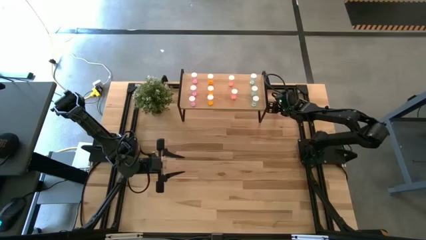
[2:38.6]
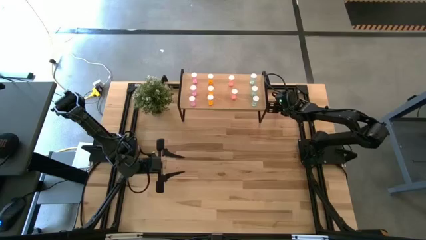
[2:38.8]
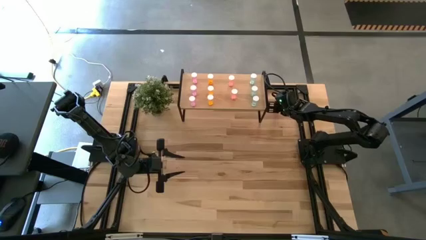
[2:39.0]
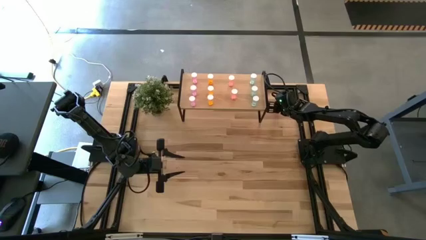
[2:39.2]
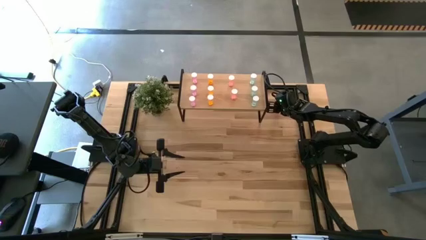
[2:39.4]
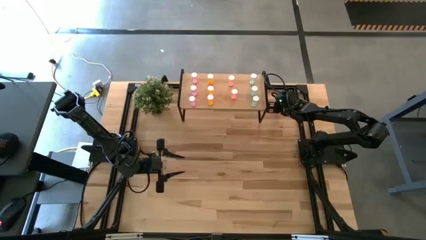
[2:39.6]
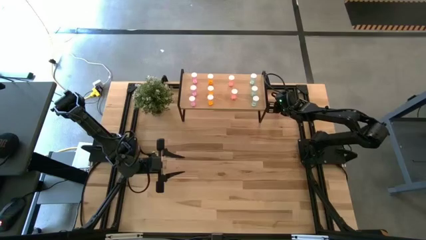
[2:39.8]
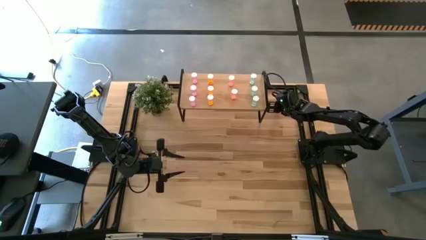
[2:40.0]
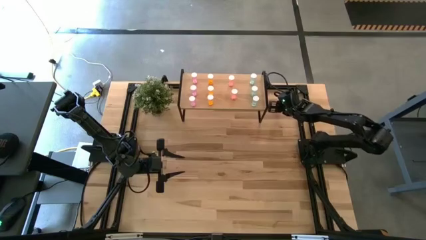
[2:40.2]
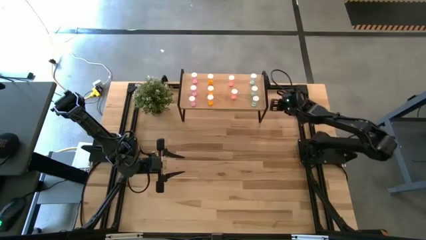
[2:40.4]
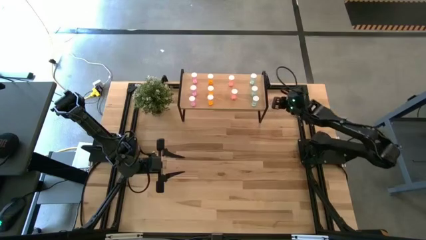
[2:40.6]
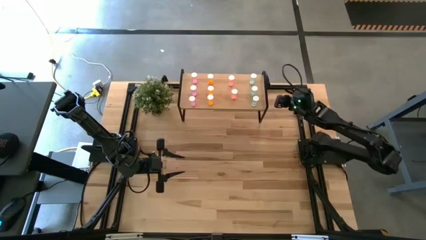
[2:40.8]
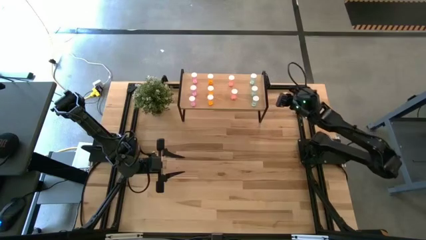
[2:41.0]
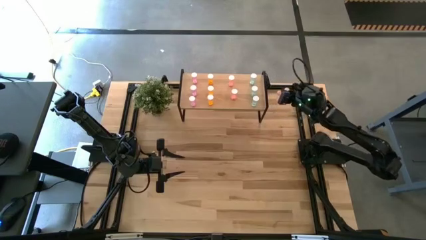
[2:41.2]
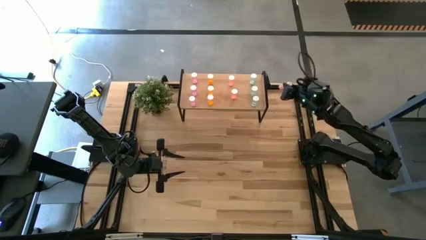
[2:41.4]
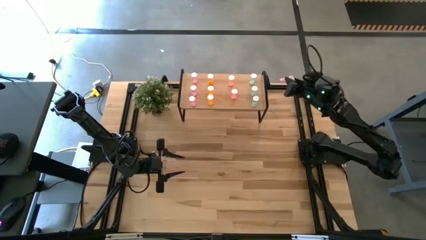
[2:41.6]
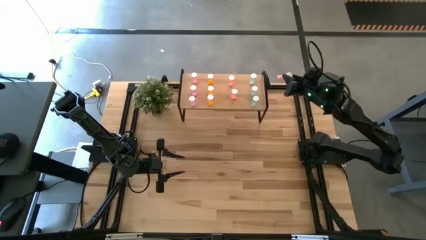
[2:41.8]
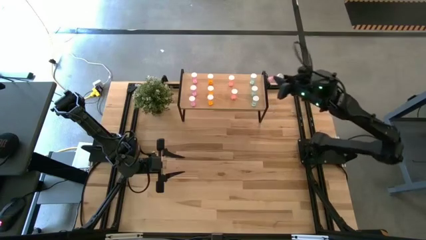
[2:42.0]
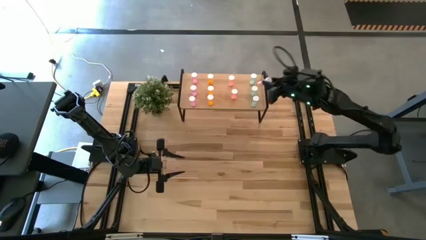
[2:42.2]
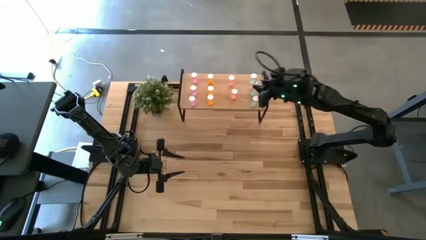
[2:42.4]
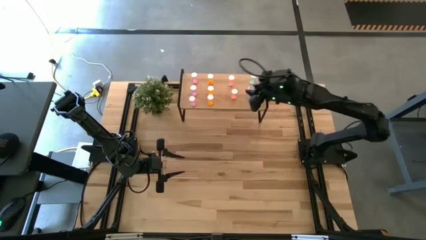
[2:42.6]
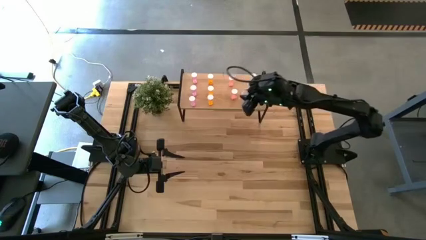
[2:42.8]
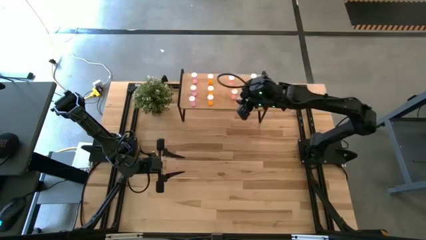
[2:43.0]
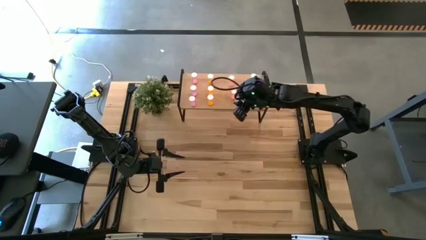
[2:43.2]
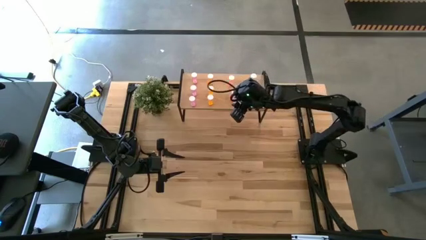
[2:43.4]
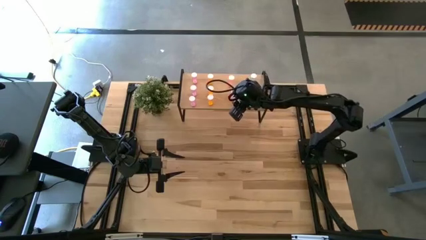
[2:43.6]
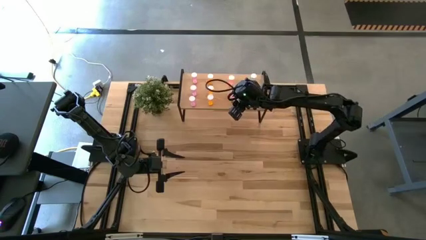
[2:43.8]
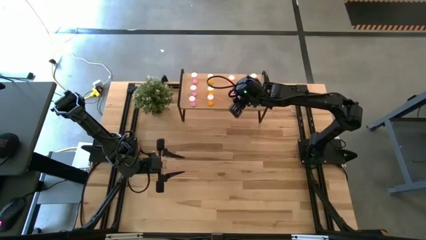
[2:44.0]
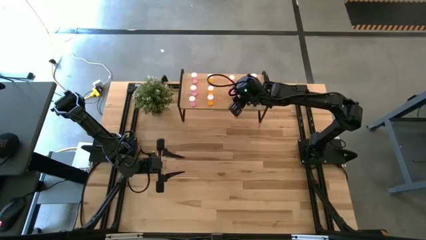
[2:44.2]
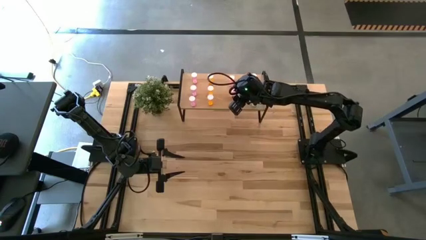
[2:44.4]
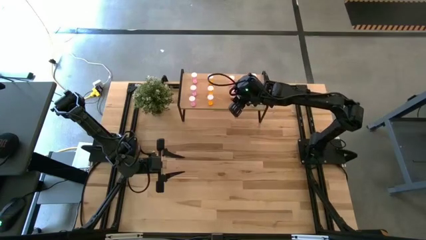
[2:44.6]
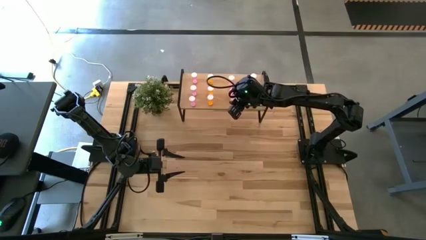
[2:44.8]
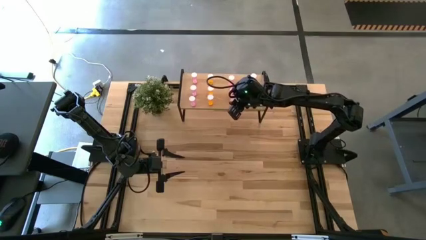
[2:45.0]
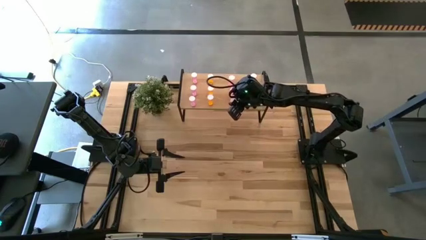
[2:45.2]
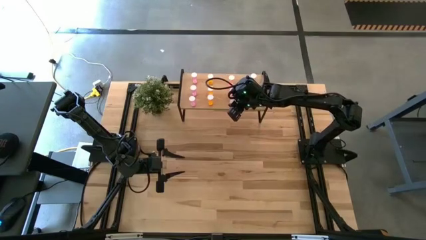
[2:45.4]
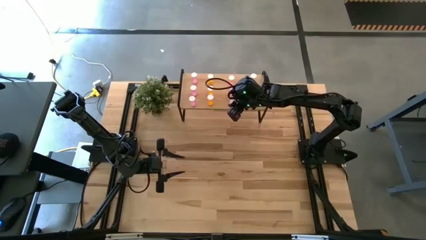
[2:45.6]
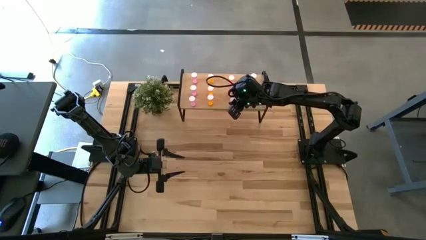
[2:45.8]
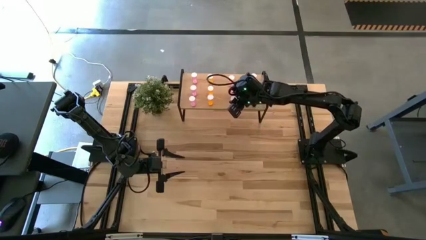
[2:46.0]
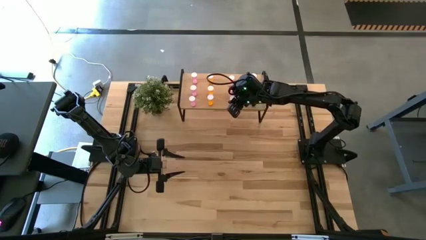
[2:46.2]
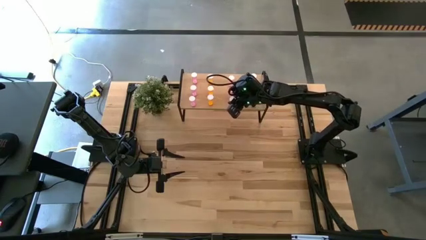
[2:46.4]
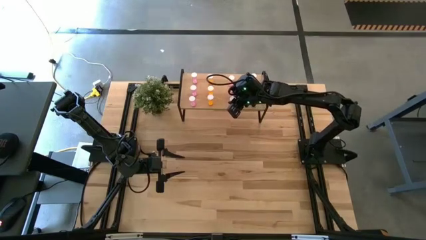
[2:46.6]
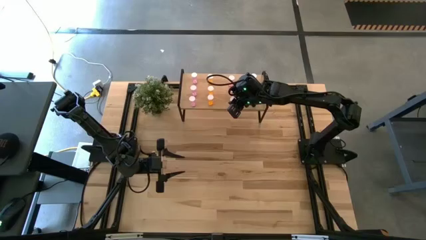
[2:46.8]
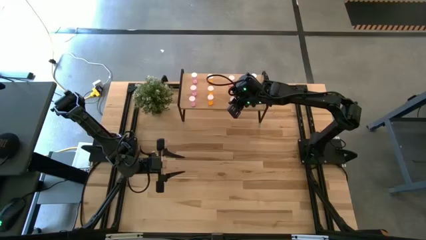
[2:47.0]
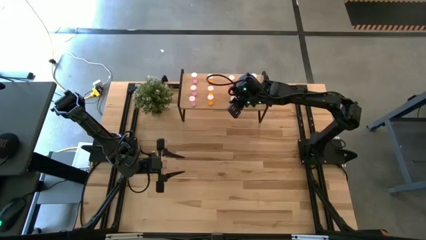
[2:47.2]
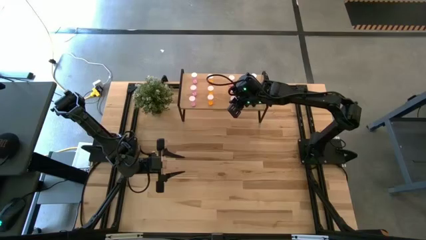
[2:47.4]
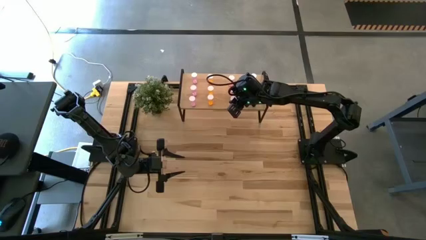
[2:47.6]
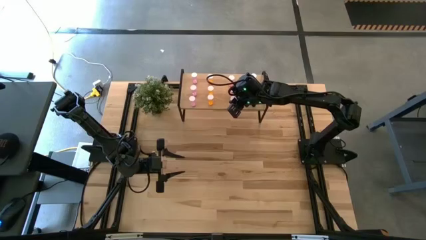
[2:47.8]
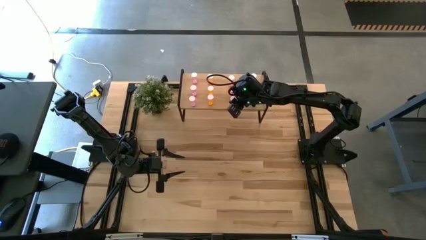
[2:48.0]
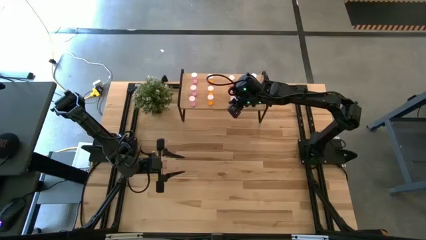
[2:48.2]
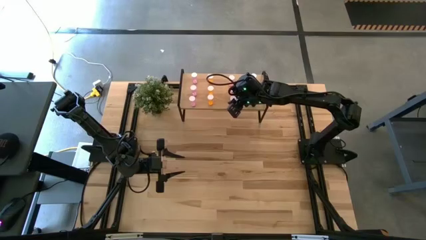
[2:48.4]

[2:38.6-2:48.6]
Task: Pick and place medicine bottles onto shelf by color
Put the red pill bottle aligned with the other red pill bottles on the shelf

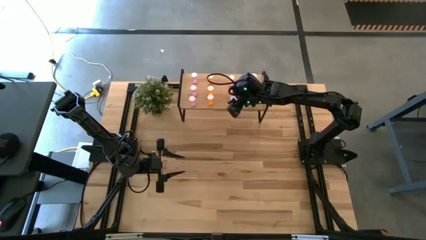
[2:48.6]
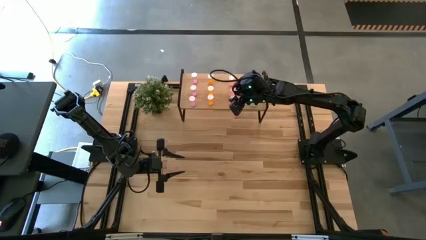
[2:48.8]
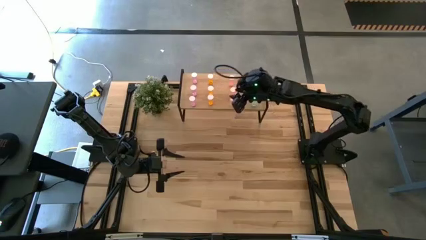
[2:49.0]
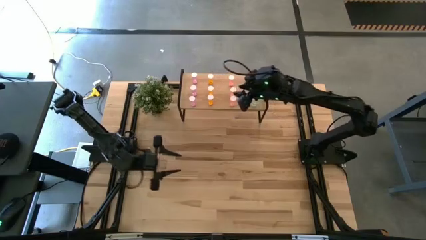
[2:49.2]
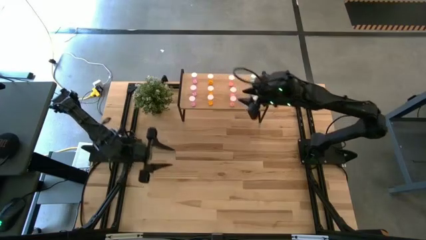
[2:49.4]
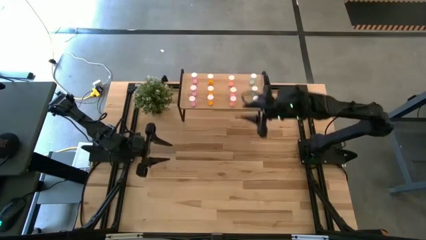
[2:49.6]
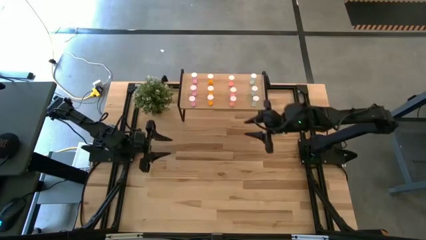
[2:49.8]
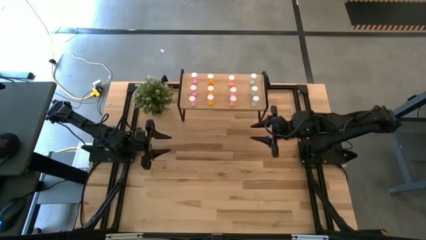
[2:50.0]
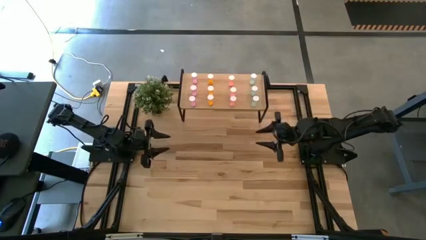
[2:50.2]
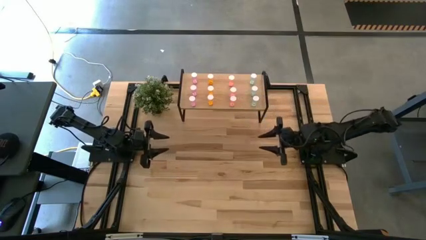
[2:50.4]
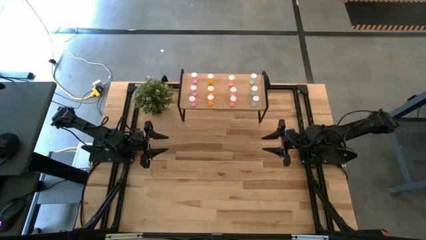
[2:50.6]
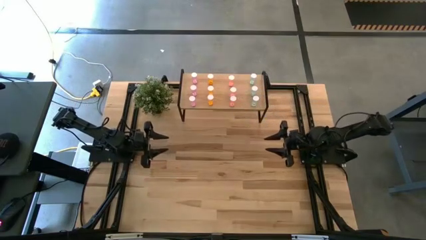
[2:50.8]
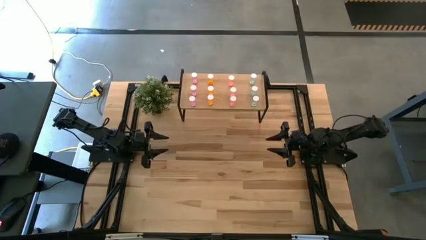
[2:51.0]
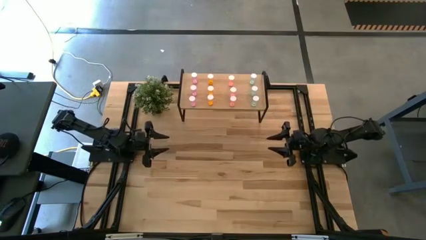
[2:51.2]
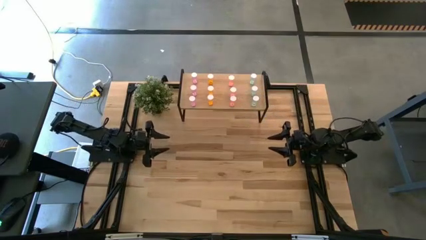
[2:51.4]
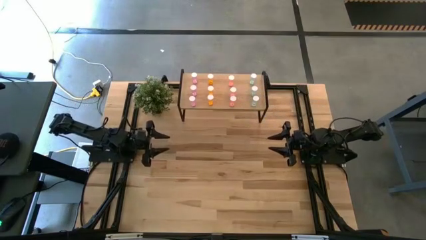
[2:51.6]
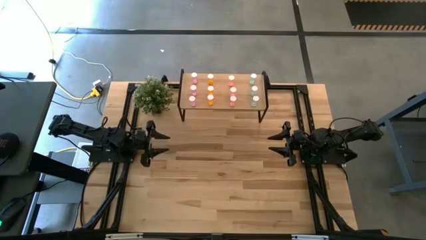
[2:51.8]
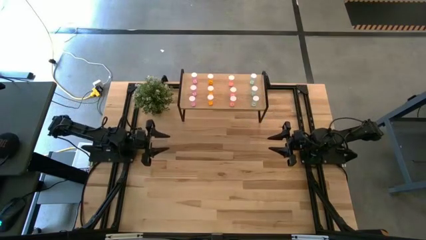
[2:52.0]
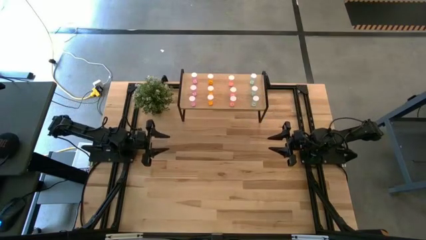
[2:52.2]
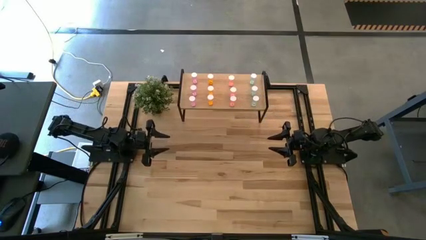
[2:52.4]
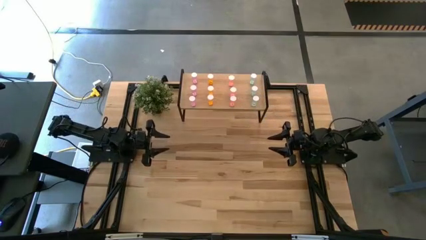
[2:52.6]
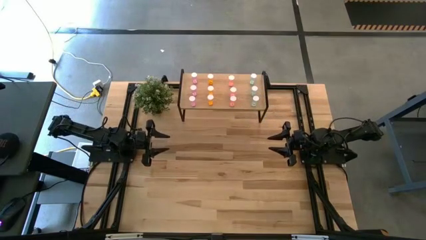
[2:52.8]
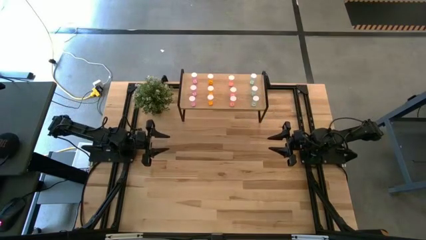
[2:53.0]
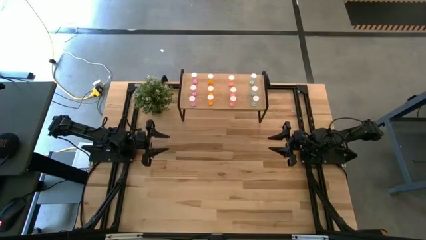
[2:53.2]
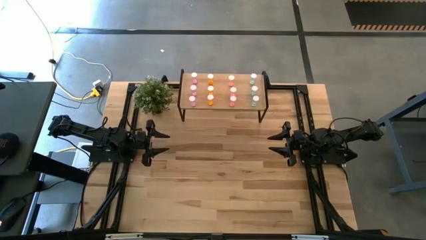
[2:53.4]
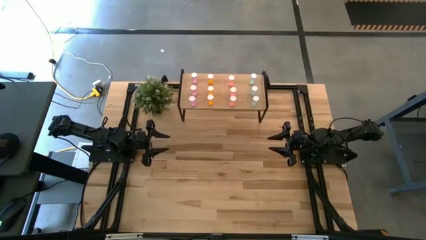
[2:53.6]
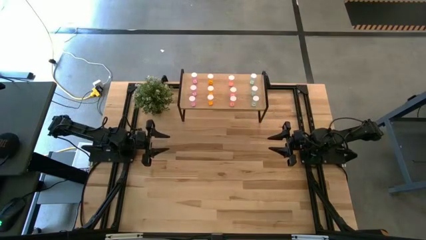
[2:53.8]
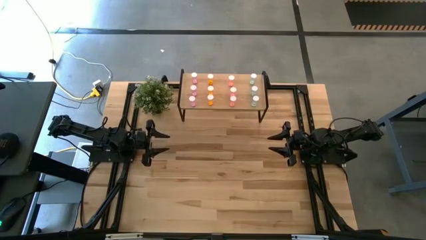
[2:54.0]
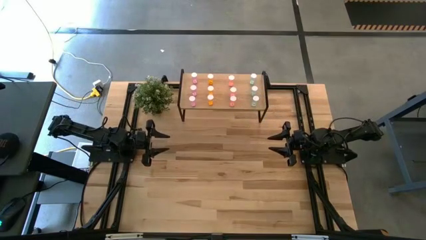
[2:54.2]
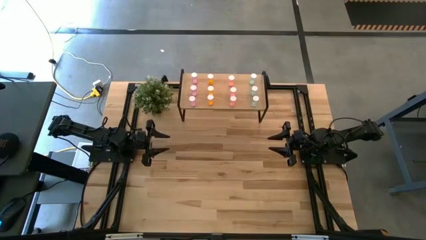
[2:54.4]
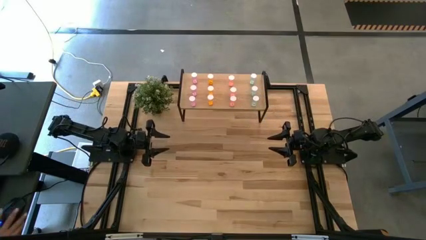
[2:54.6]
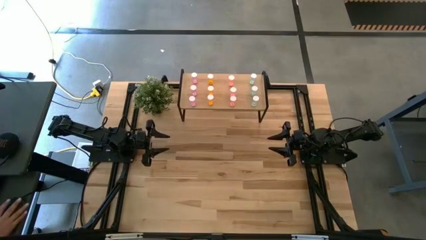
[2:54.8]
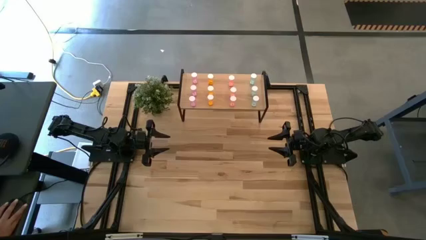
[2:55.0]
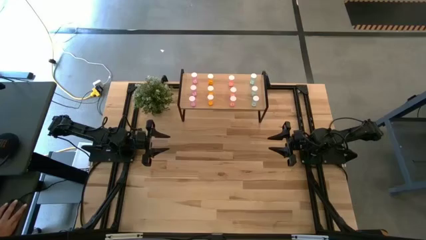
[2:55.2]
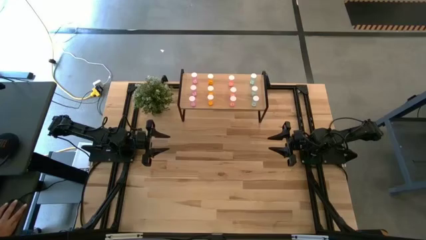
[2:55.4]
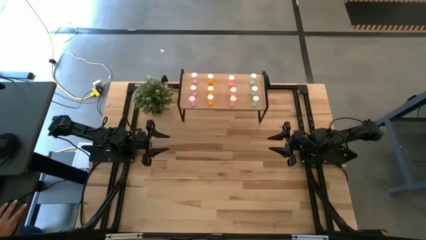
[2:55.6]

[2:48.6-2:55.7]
Return to Home Position
